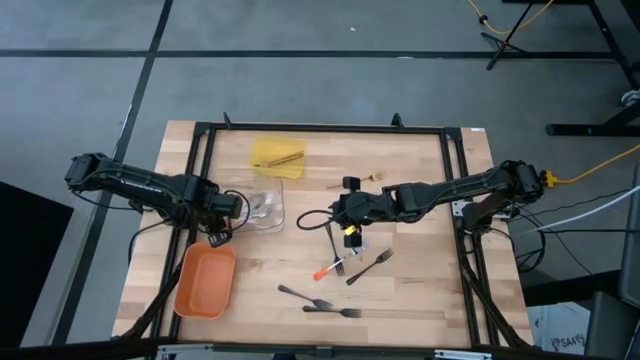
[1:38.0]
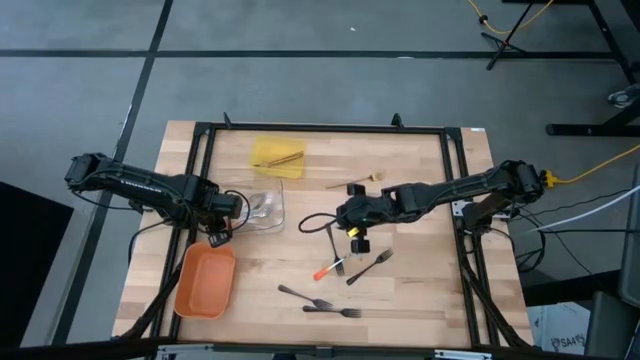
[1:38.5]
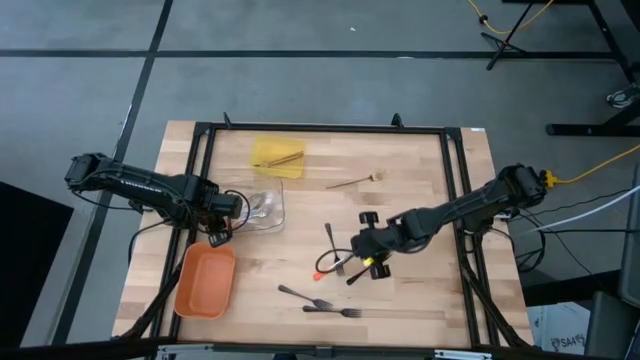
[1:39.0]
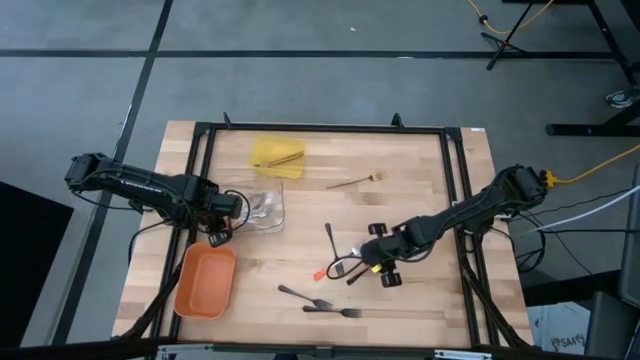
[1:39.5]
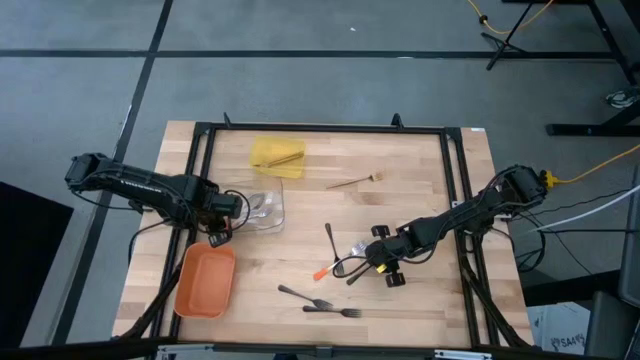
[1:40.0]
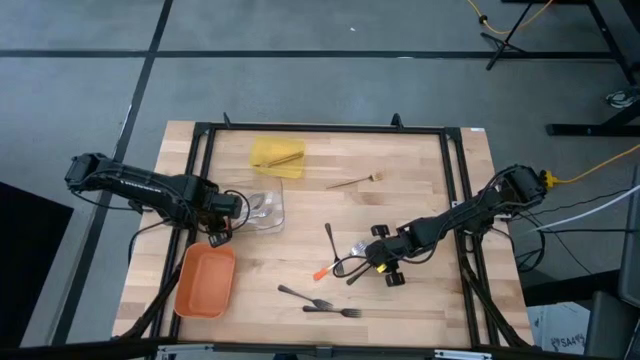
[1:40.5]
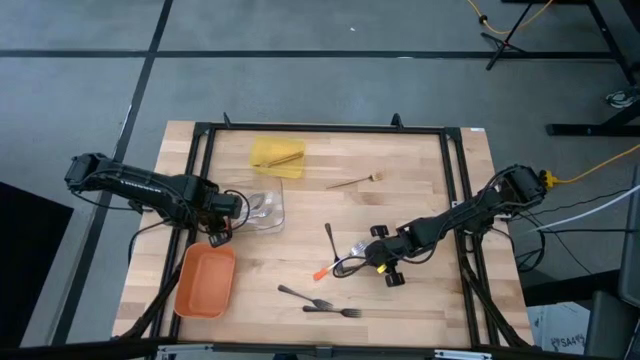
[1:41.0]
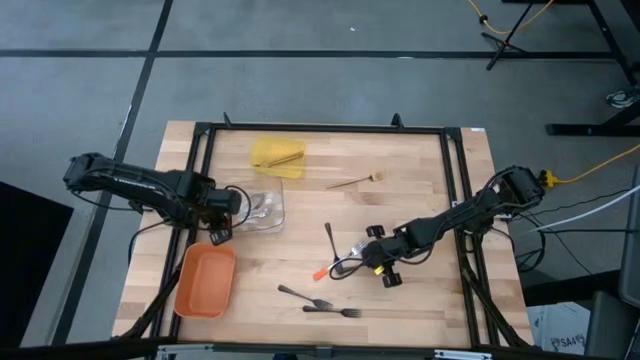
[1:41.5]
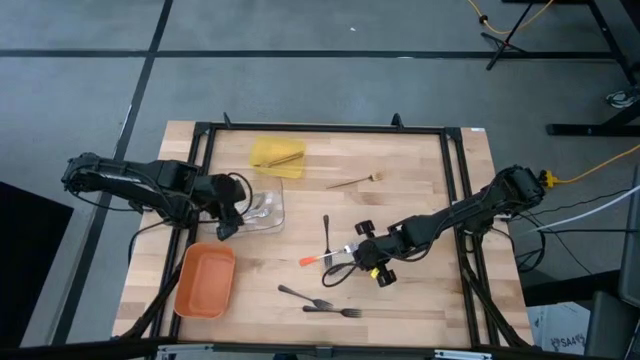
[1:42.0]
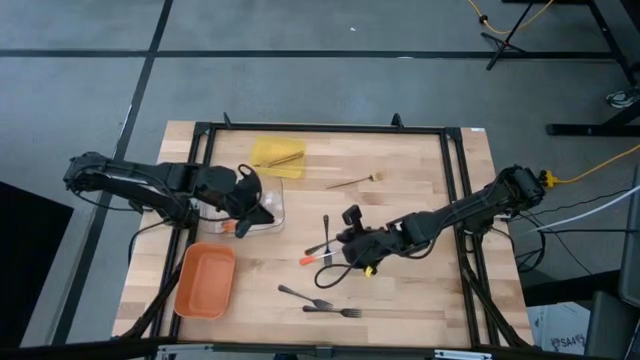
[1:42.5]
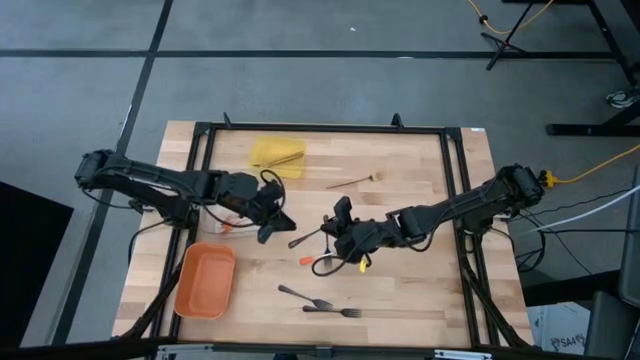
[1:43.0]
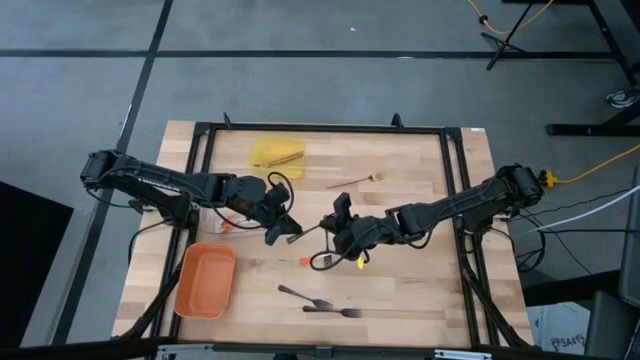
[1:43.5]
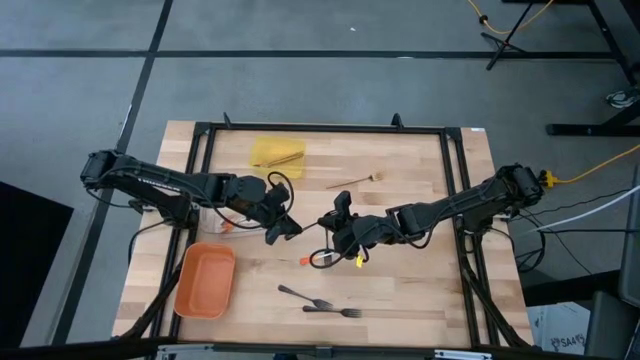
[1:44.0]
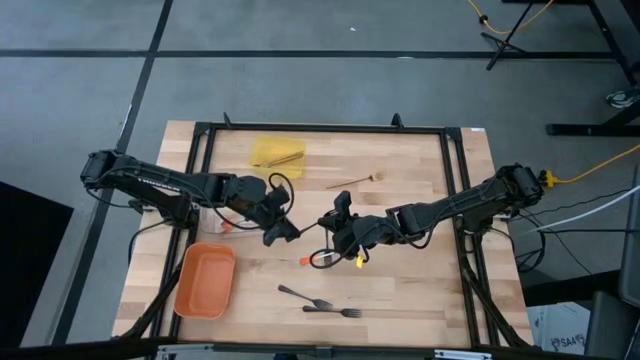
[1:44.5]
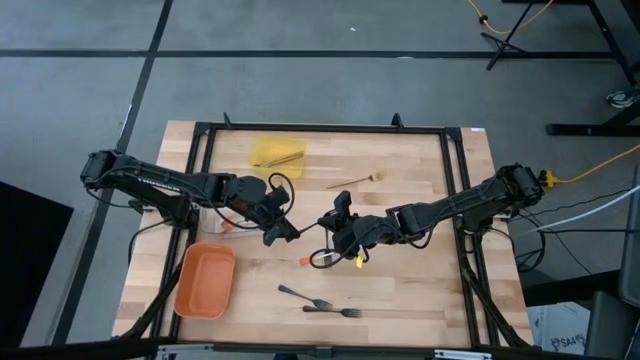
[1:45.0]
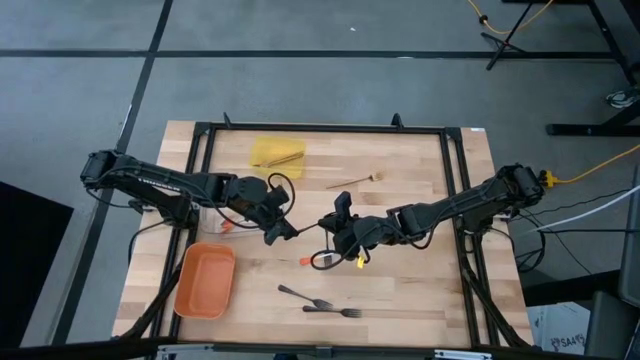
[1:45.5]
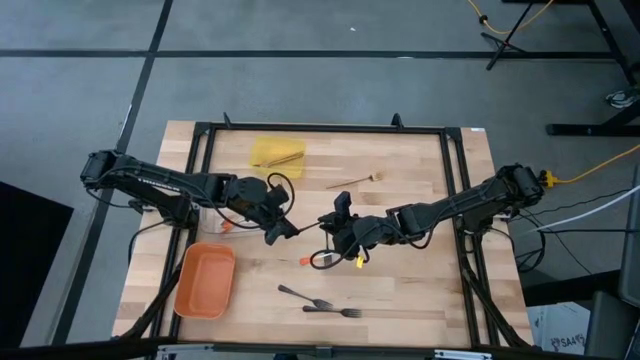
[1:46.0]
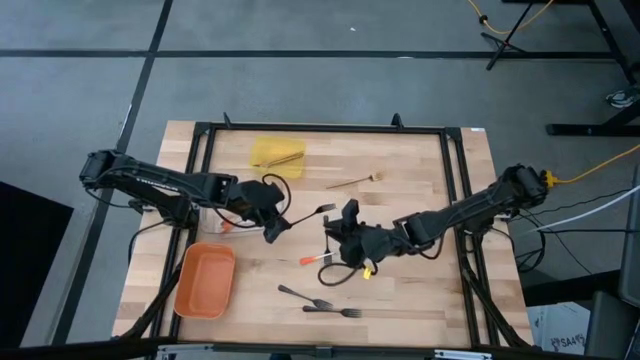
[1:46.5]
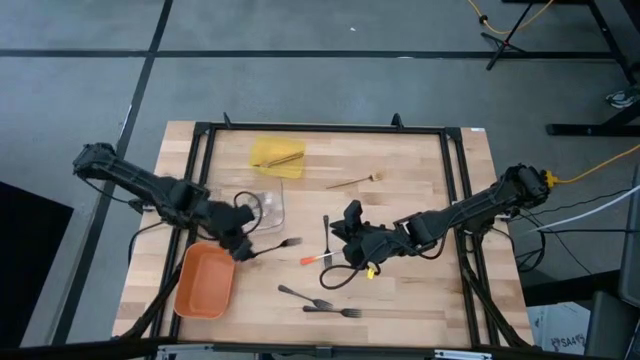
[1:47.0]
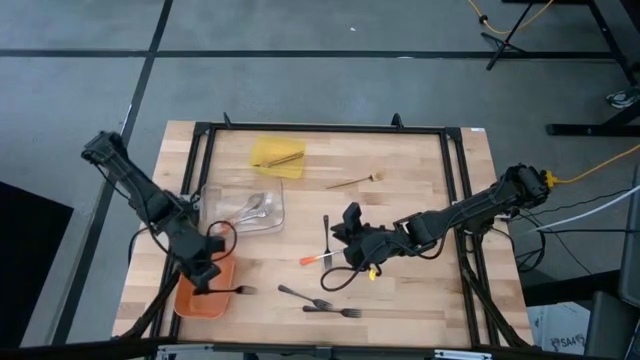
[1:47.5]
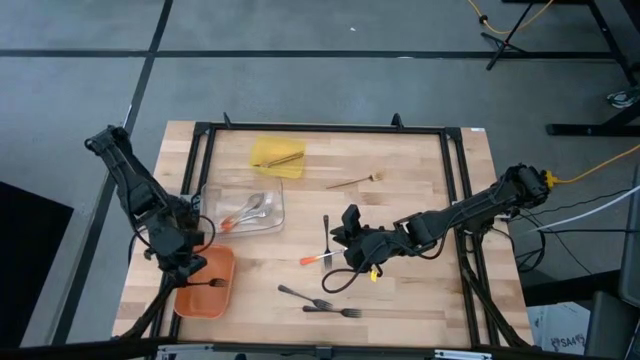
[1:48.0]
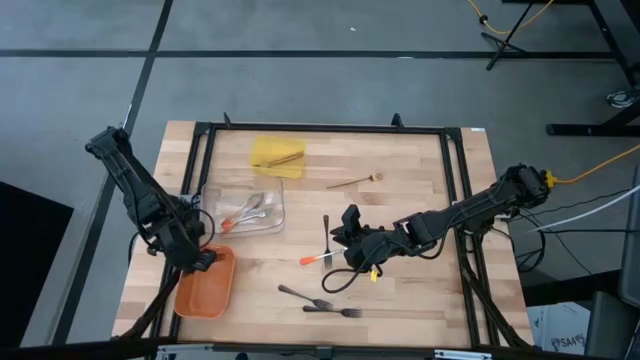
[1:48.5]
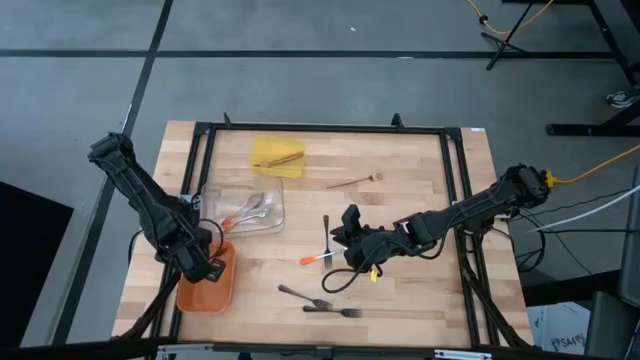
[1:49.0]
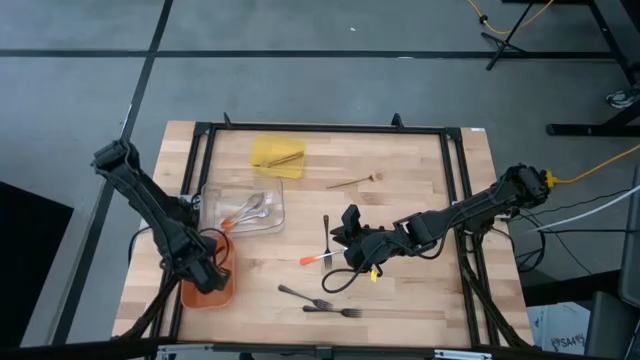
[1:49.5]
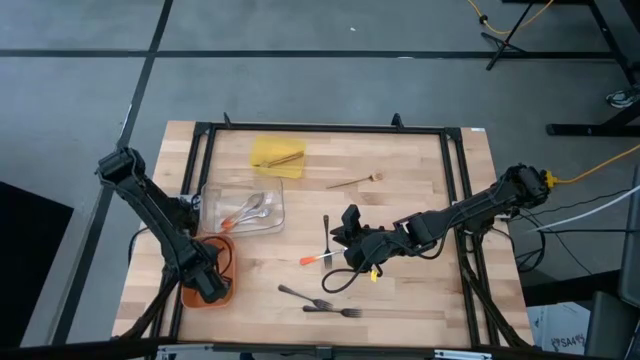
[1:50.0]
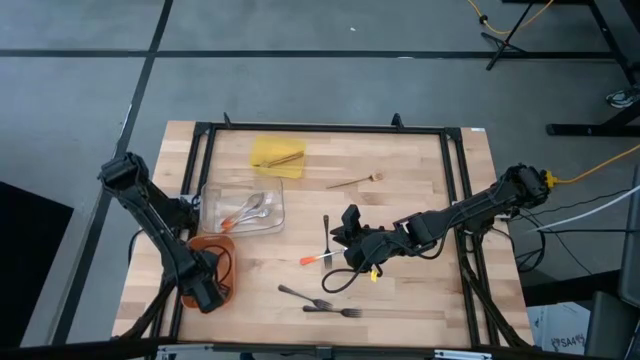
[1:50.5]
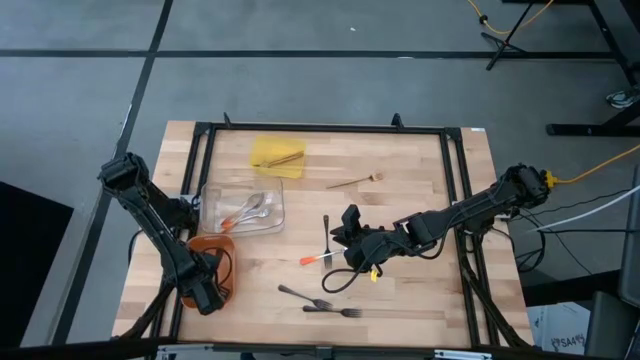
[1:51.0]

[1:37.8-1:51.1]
Task: Sort silverware by color (type)
Put the black fork into the orange bin

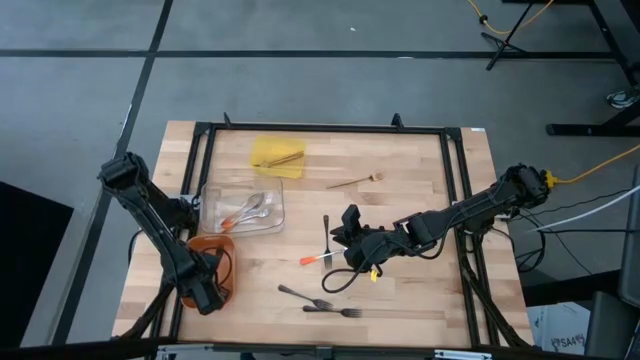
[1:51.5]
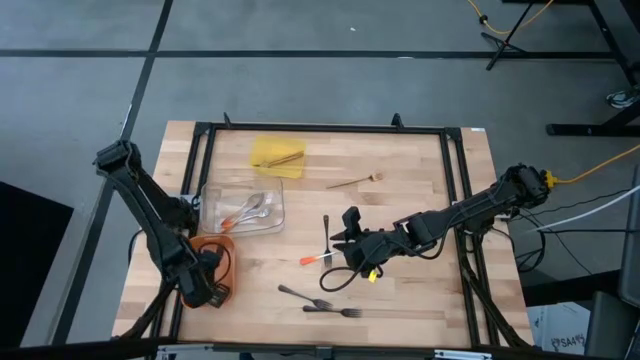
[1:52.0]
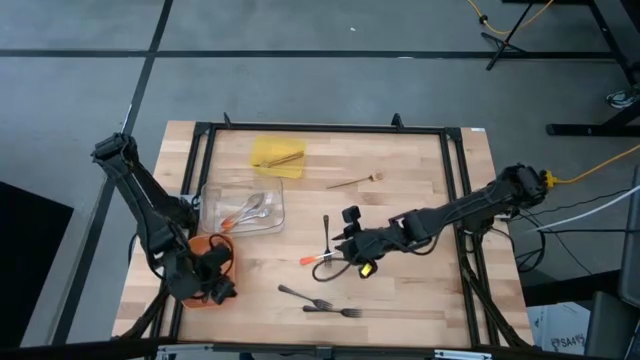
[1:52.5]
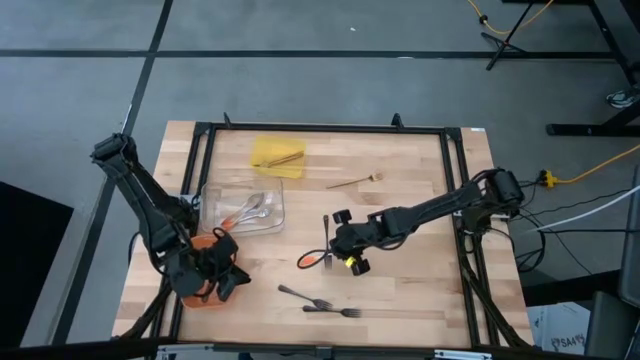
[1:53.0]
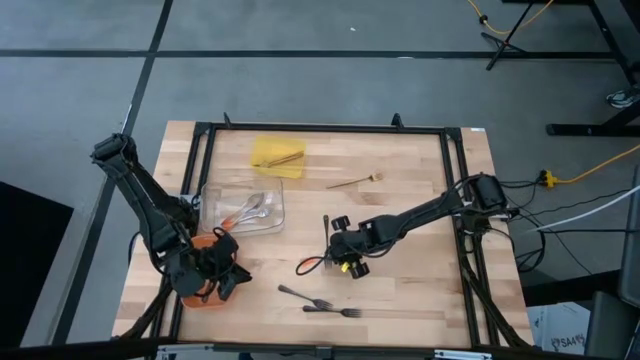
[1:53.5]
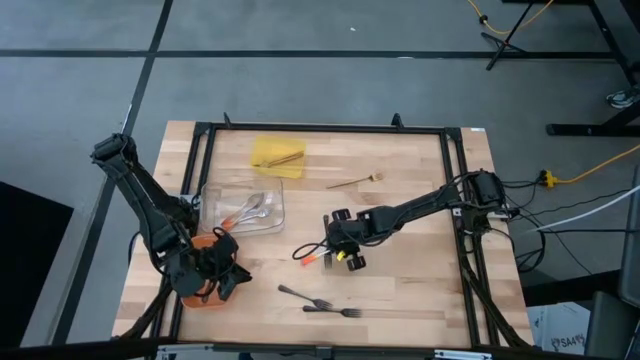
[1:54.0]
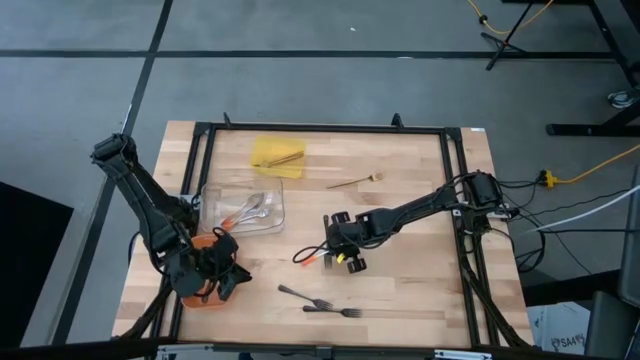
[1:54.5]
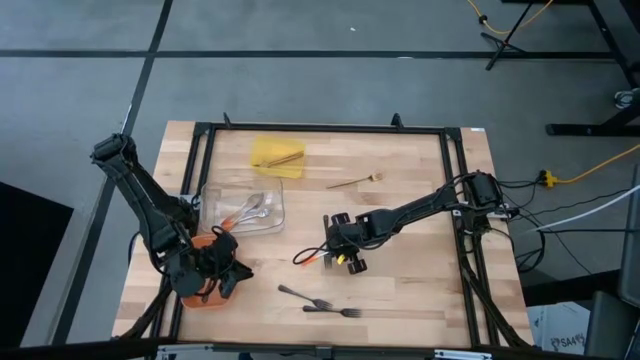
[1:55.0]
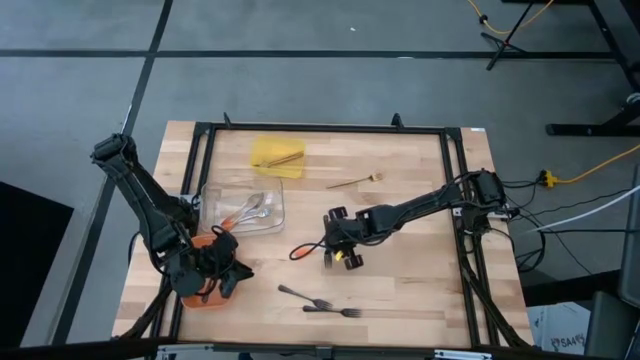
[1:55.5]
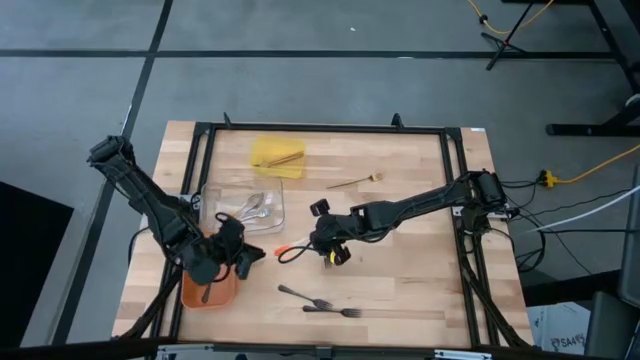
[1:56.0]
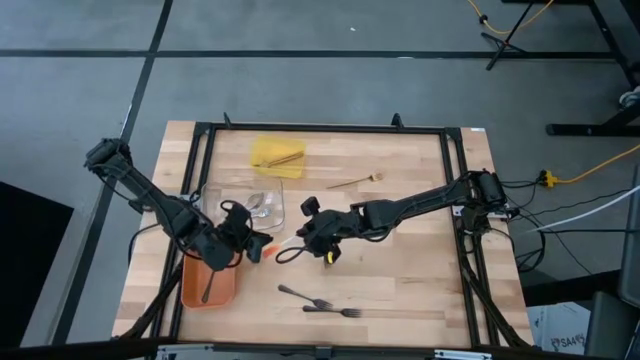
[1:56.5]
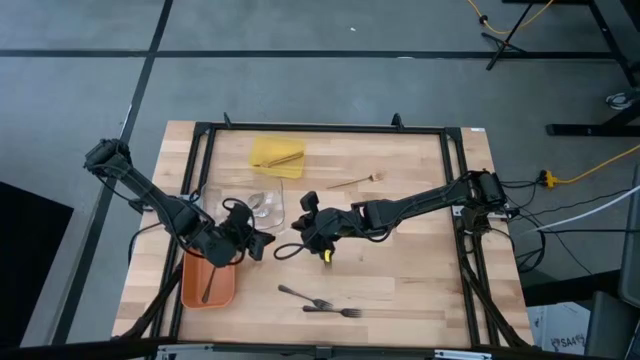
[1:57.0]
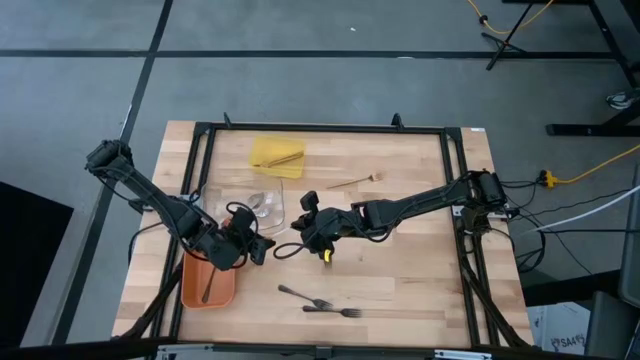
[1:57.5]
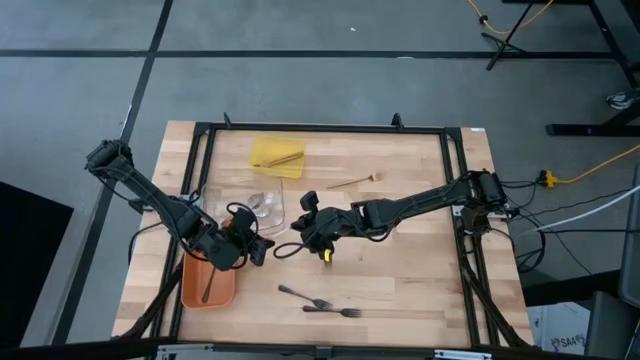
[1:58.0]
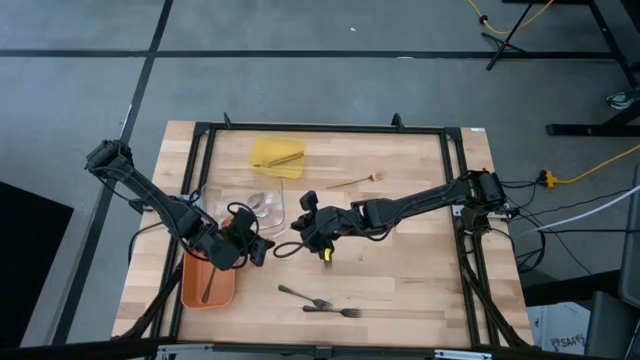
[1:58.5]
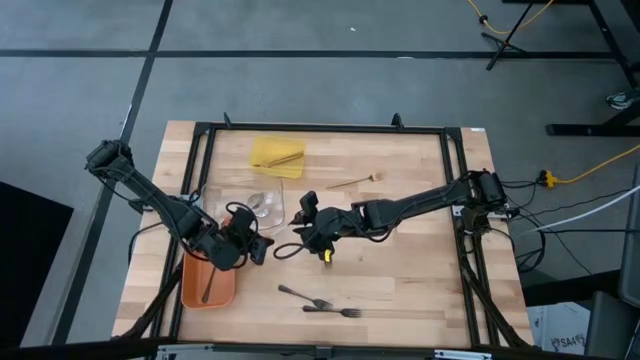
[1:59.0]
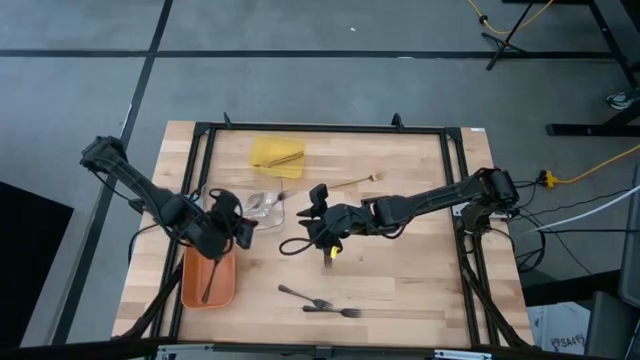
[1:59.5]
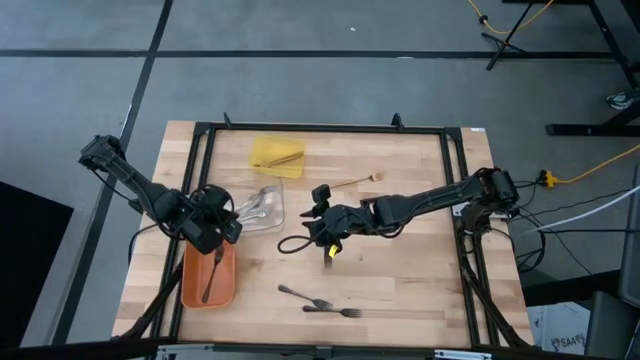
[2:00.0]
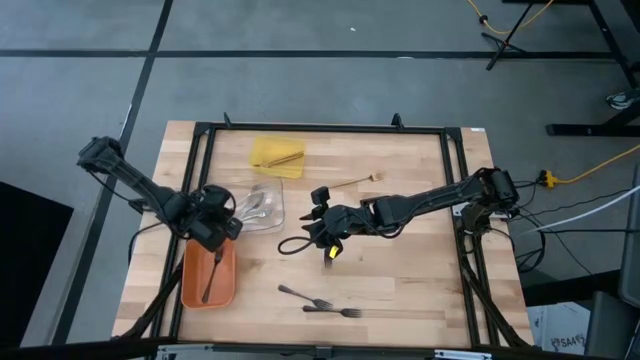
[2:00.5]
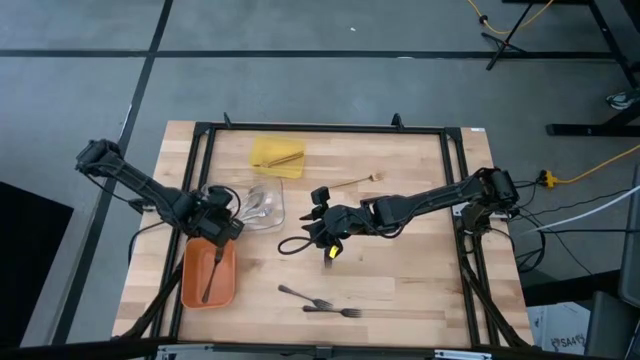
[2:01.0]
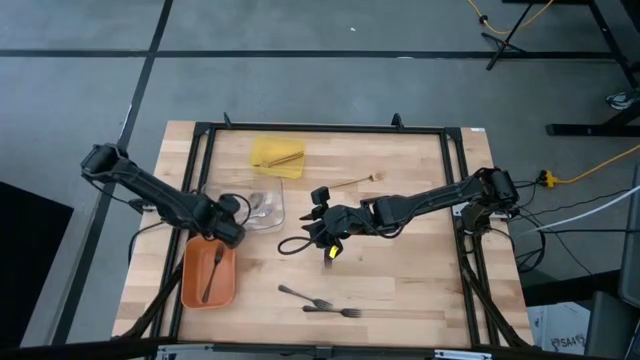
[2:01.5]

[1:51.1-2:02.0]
Put the orange fork into the transparent bin
